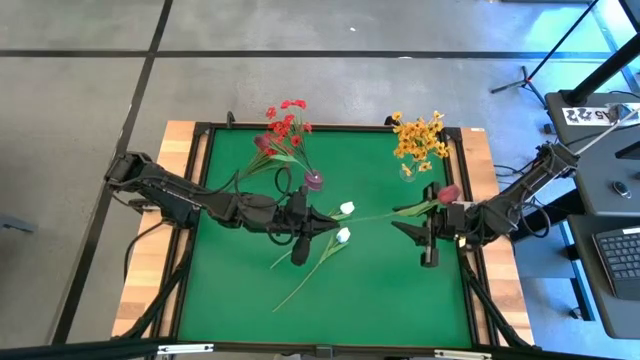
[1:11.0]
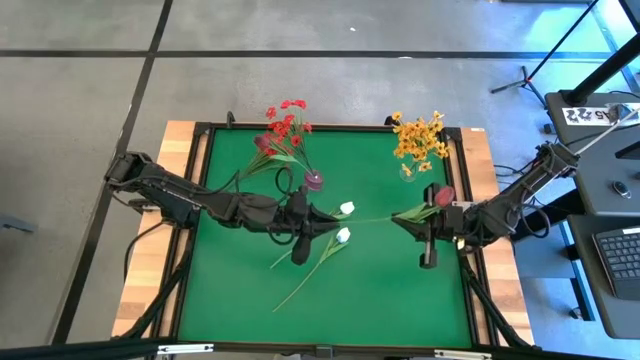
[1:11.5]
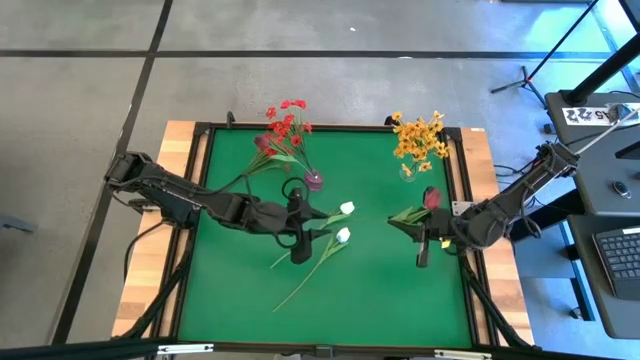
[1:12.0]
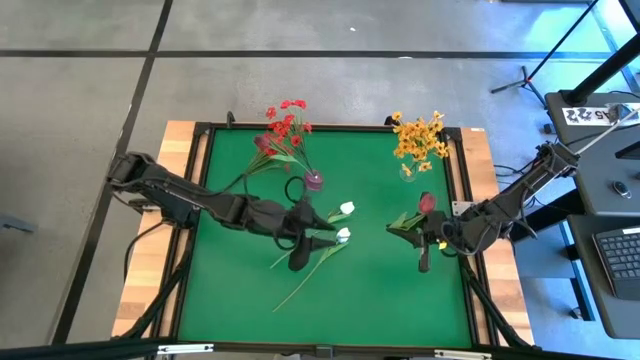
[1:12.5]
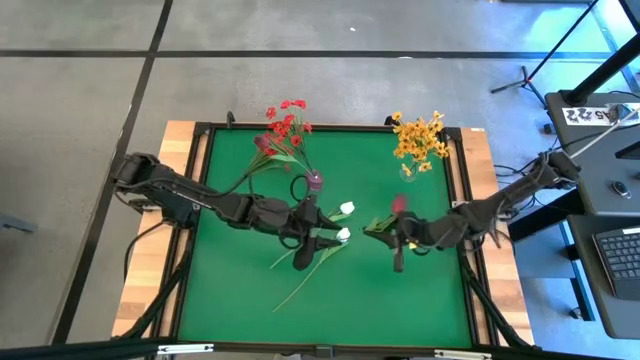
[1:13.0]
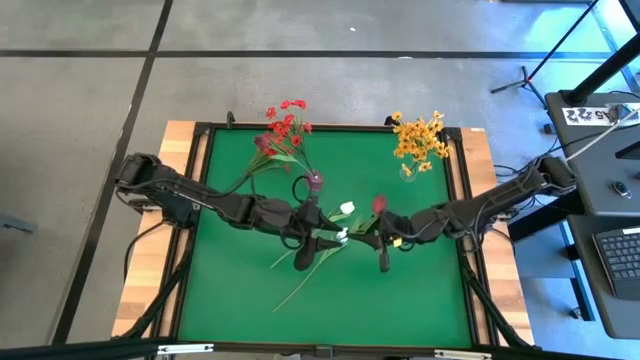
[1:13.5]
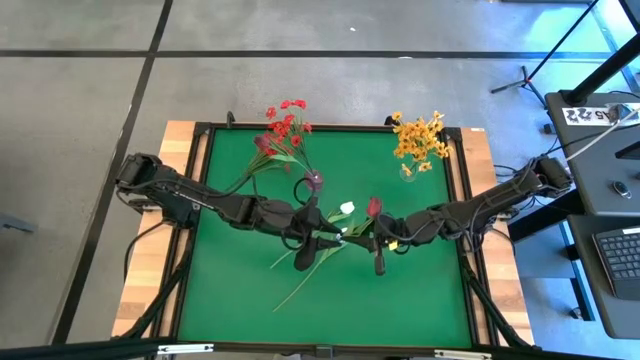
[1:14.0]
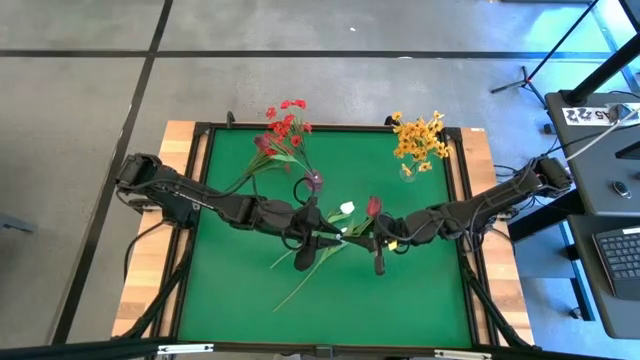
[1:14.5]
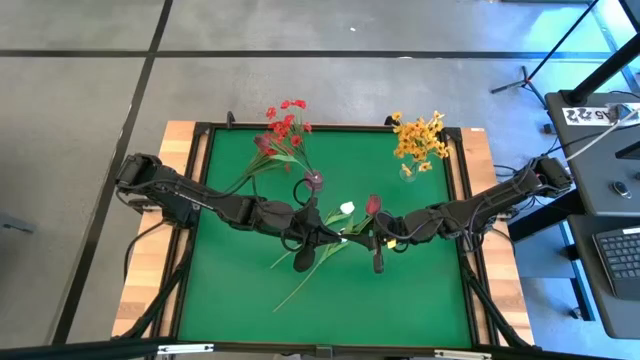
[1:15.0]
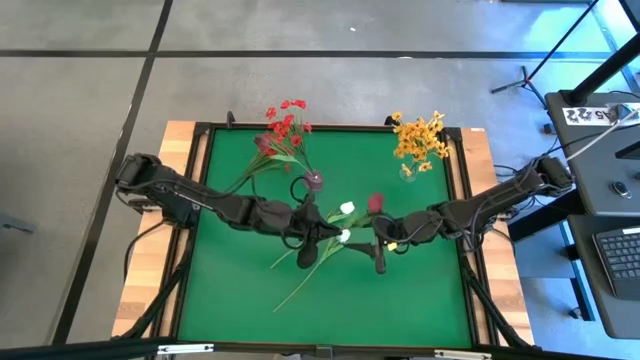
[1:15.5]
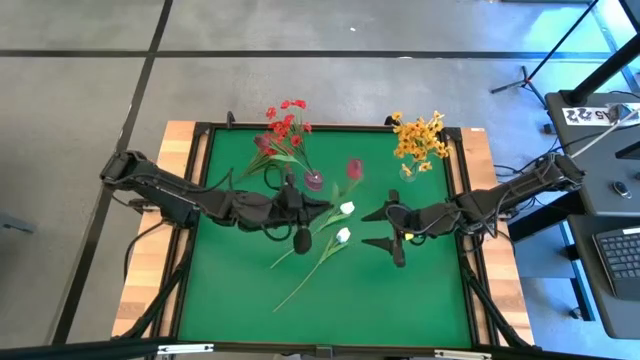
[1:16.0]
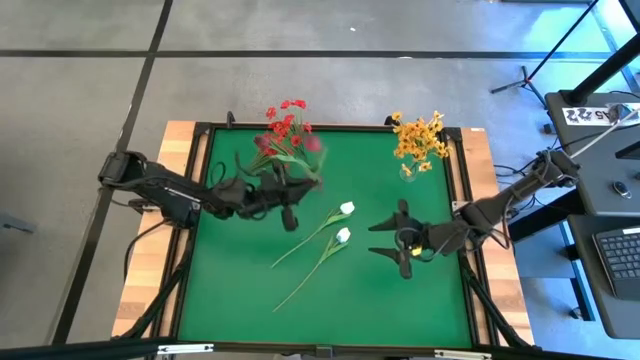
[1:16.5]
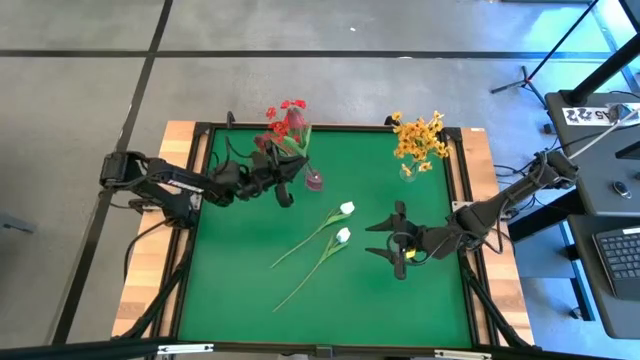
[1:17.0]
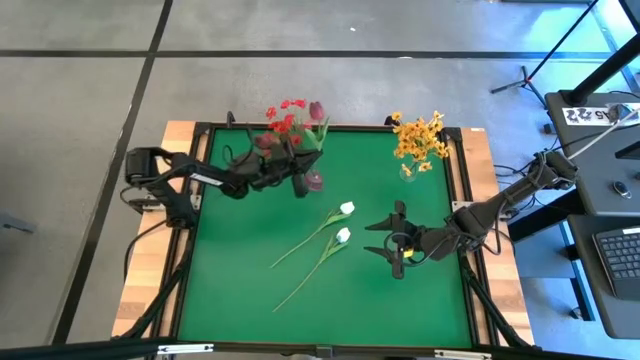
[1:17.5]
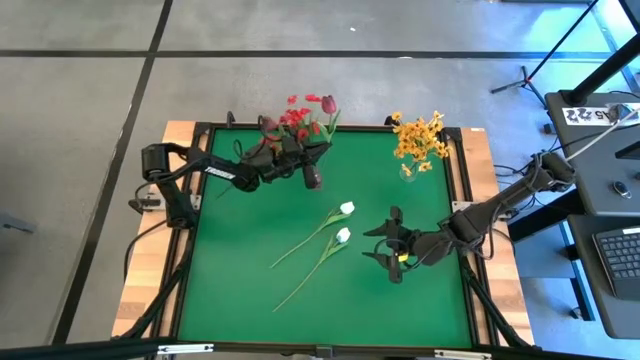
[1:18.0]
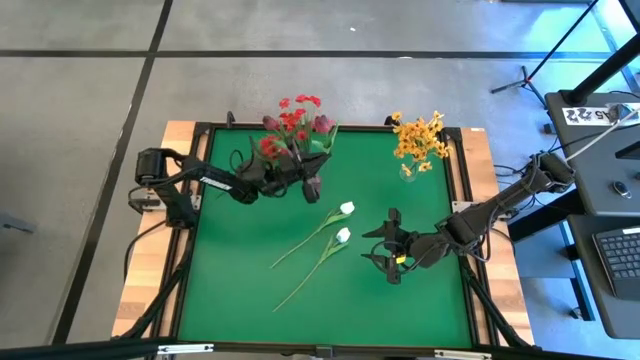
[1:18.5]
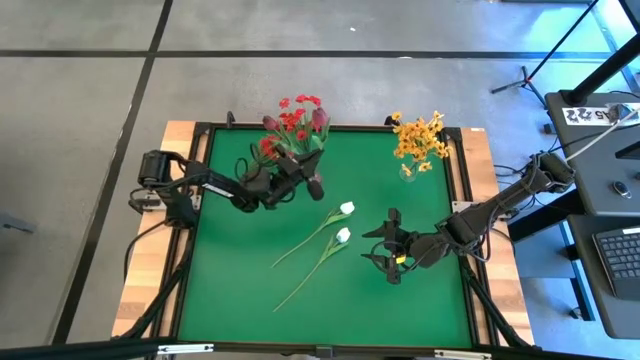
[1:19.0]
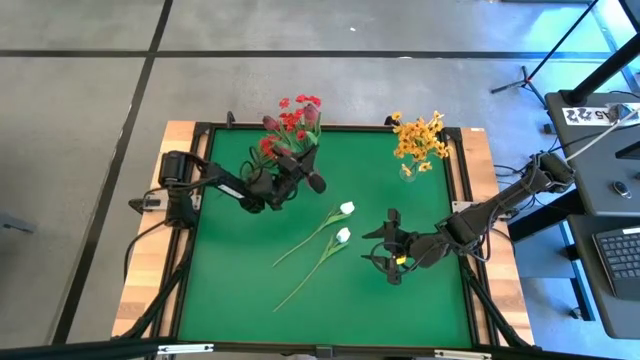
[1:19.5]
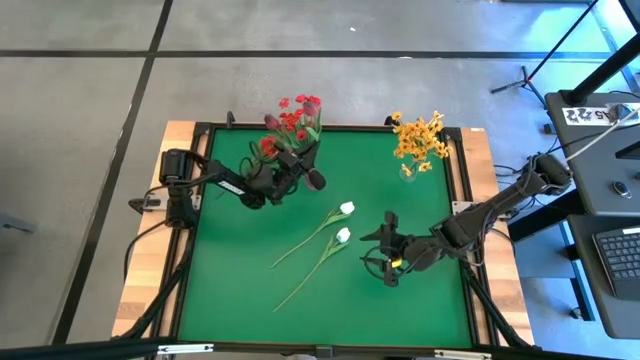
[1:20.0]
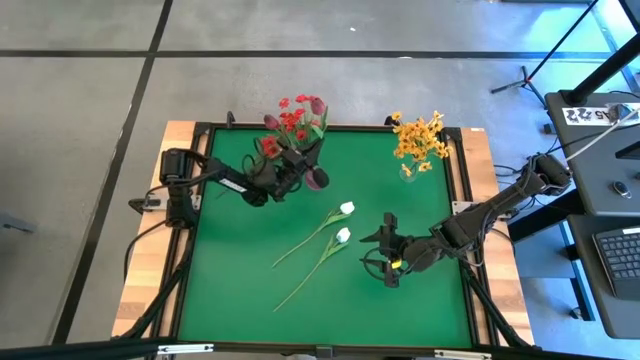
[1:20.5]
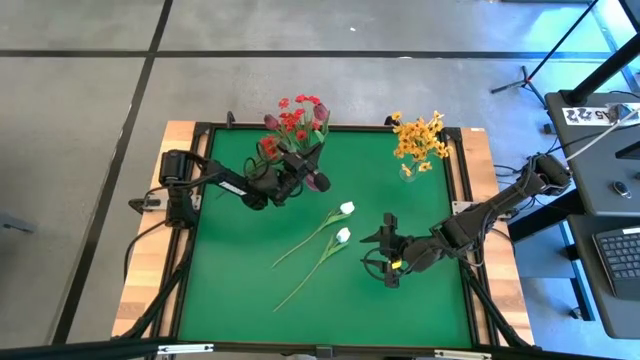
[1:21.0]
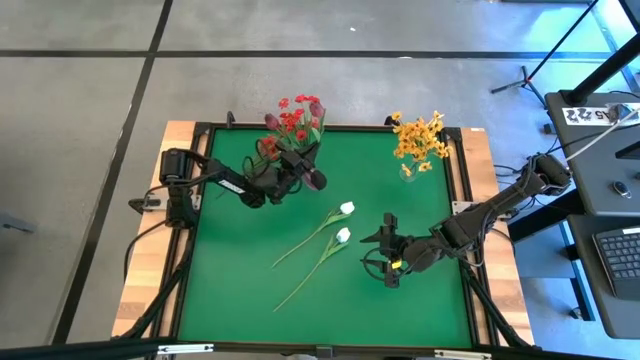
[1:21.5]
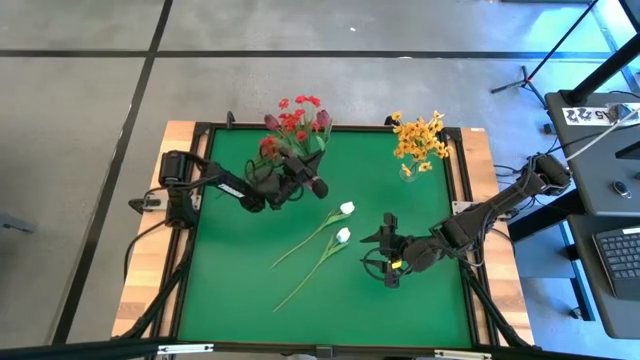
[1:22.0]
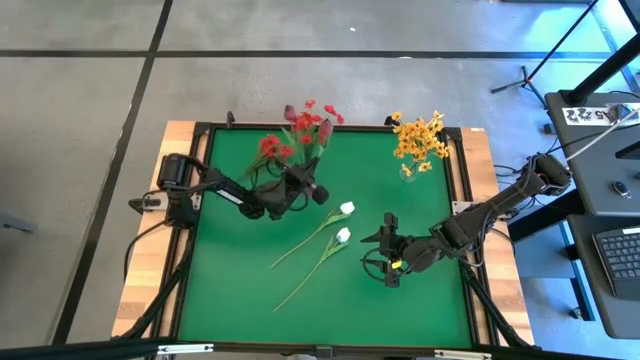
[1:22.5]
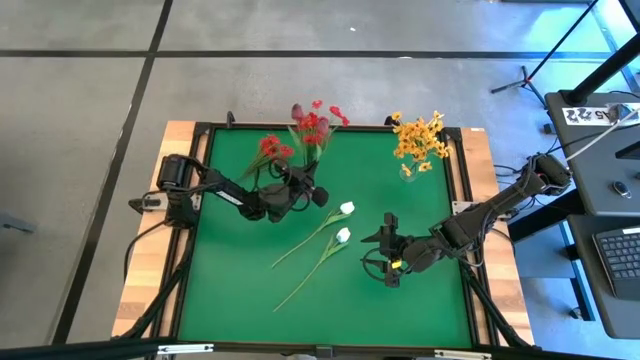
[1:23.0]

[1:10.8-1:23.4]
Task: Sort flowers into vase by color
Put the red tulip into the pink vase

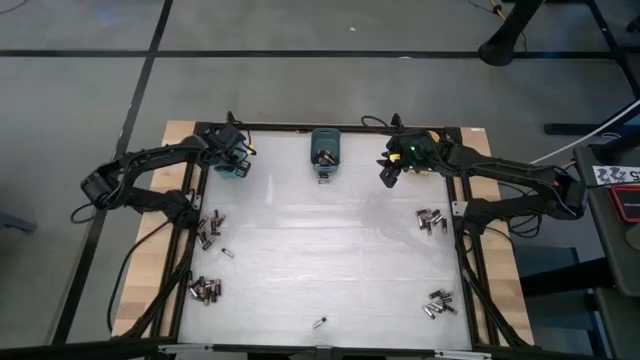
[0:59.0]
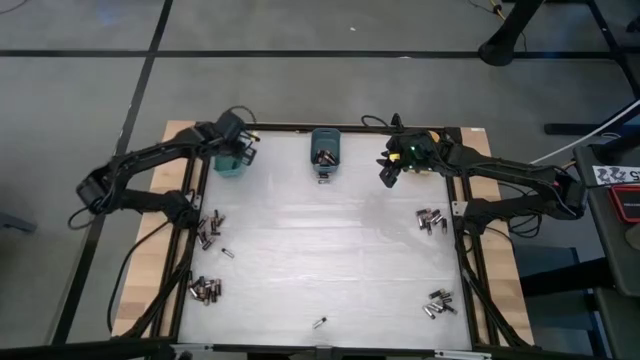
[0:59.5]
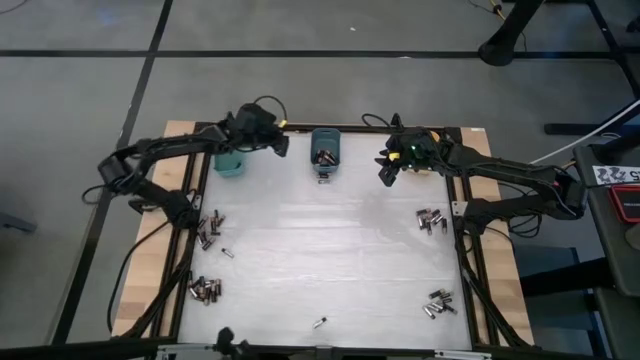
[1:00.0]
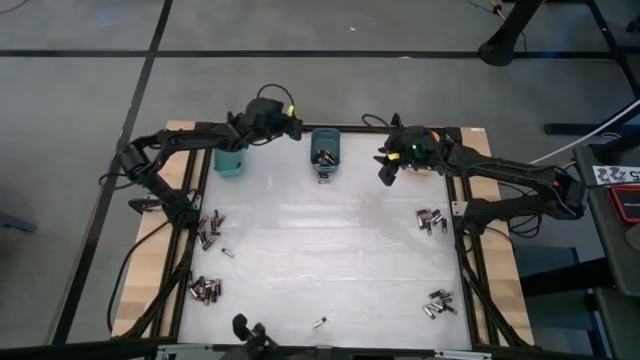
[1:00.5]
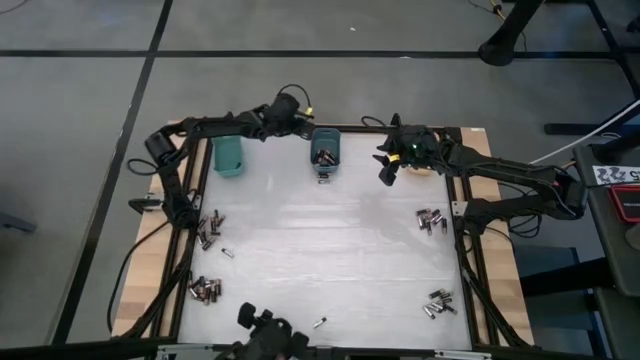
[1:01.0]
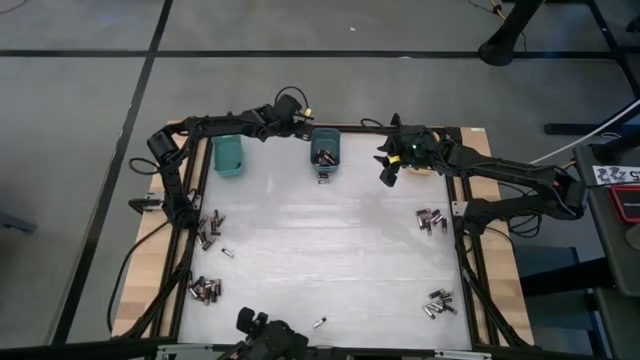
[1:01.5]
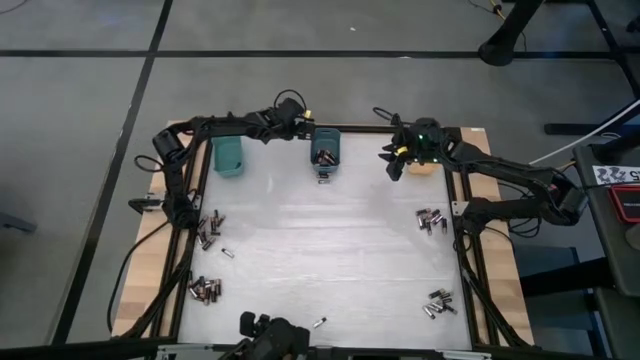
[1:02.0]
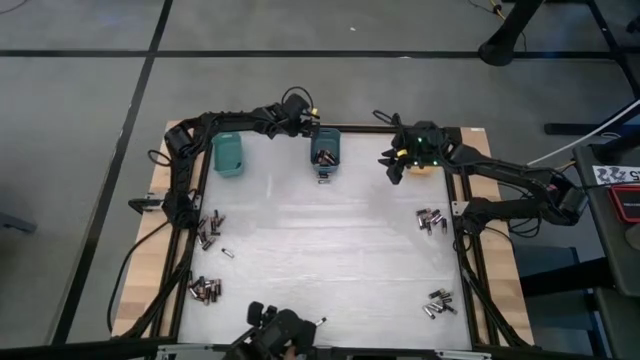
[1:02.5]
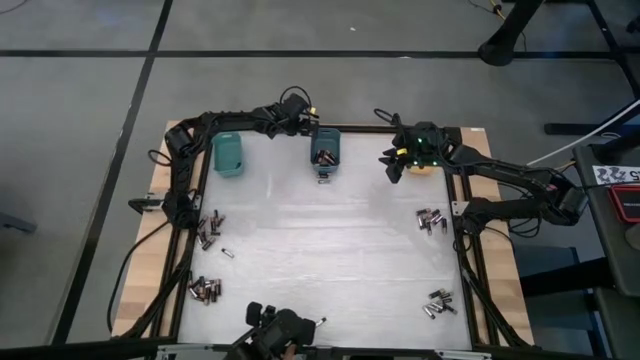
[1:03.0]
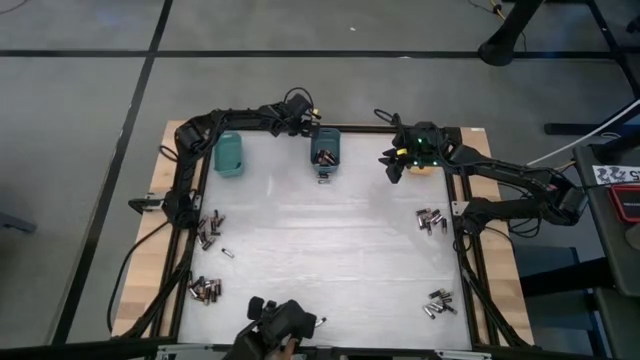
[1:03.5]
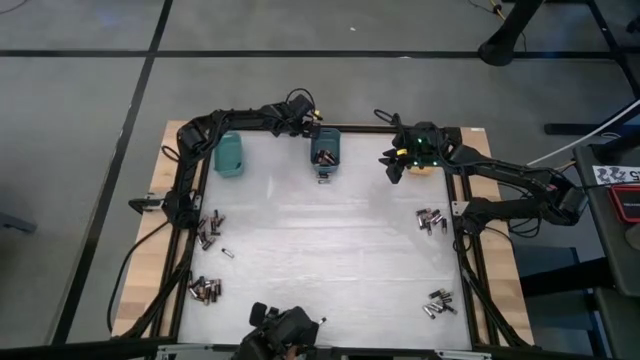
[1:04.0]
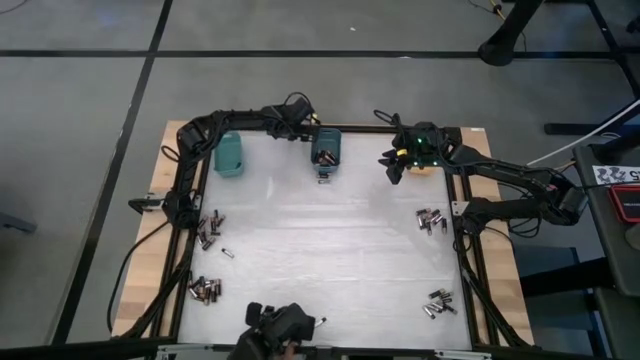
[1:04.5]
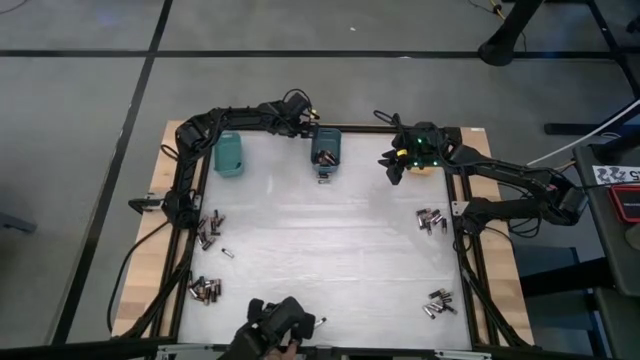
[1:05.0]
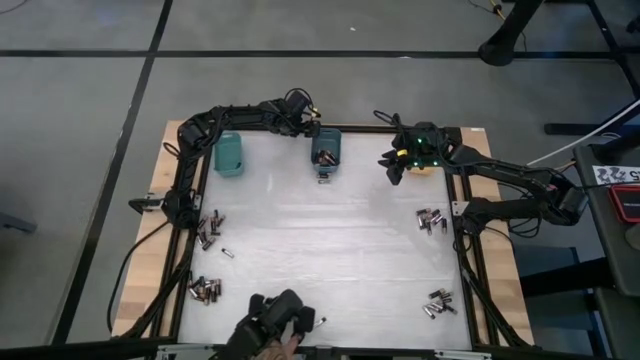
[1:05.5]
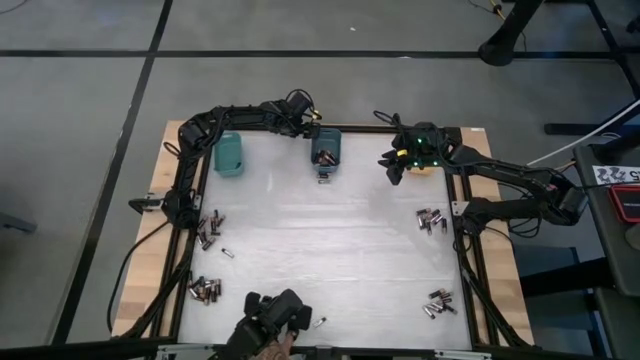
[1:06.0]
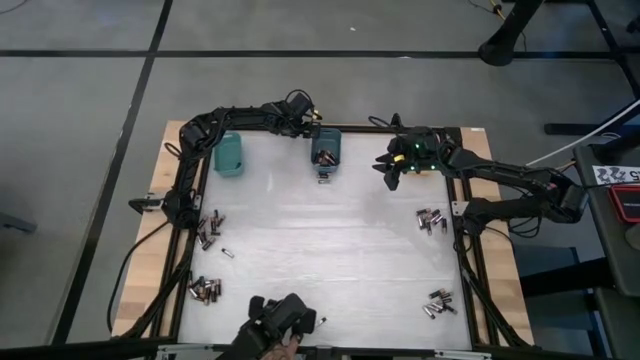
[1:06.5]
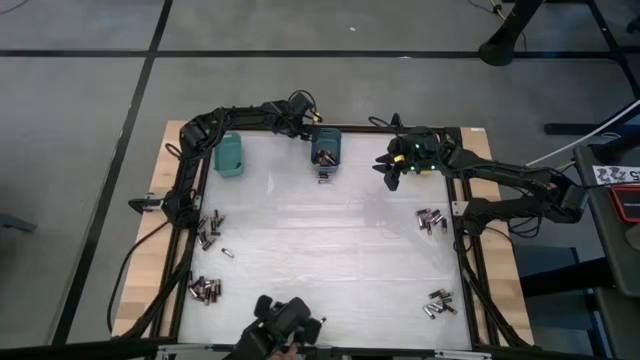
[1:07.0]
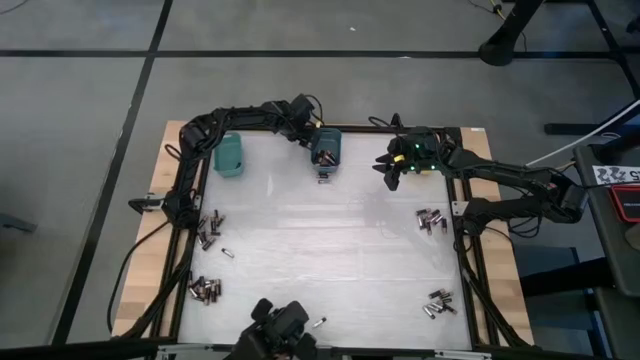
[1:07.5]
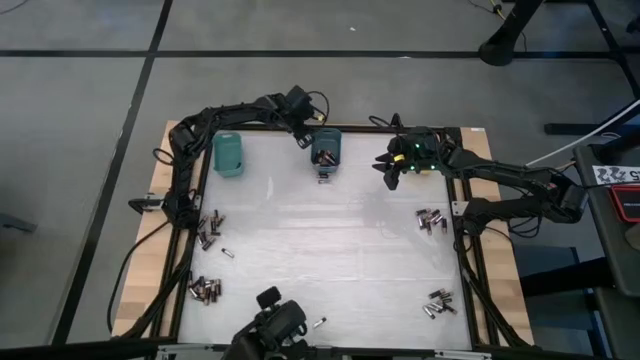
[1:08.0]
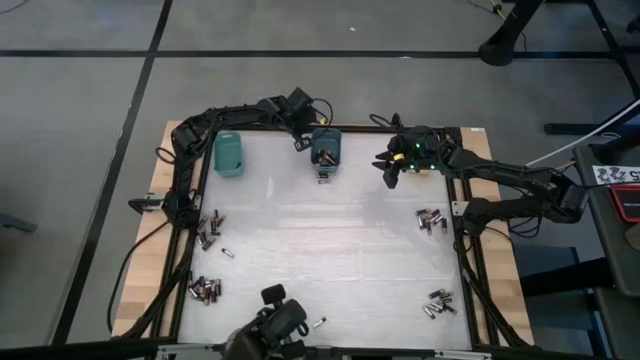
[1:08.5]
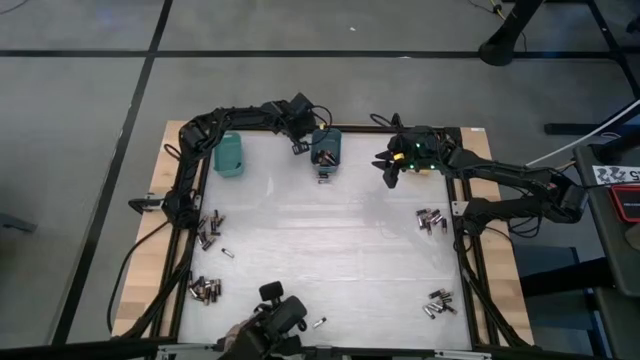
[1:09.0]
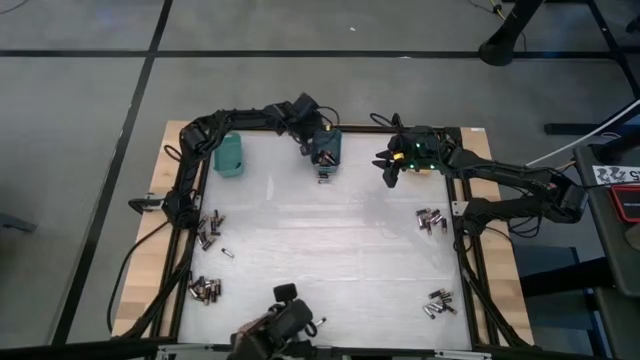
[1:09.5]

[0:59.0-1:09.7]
Task: Sort batteries
Put the brown battery into the green bin
